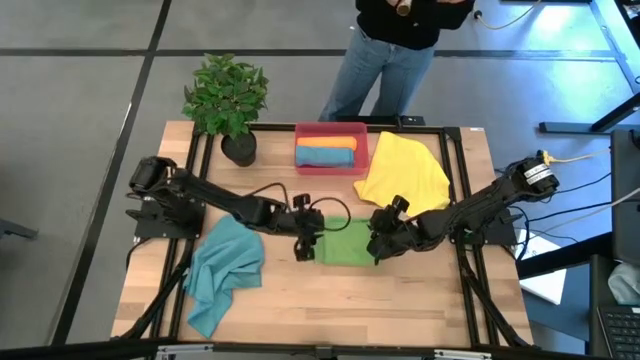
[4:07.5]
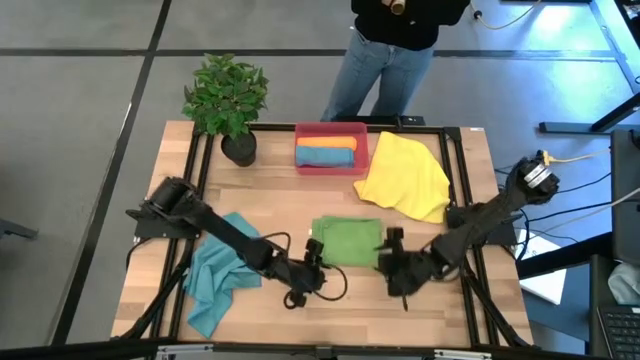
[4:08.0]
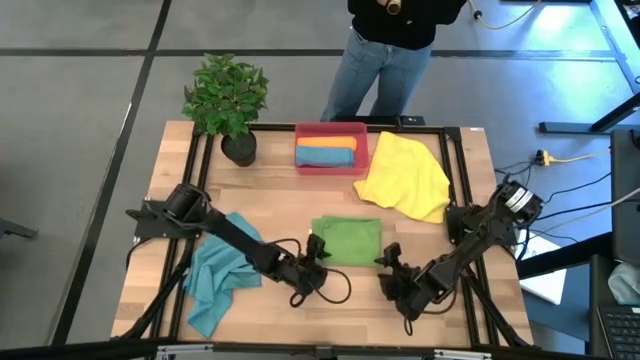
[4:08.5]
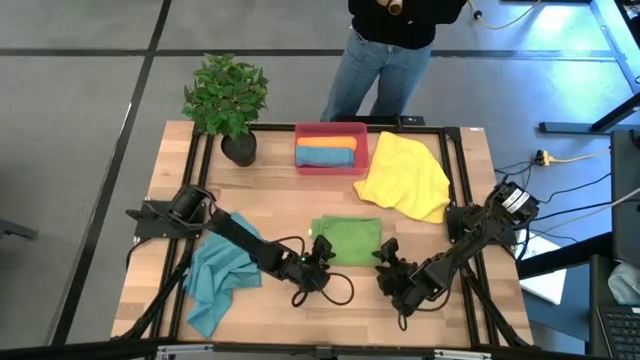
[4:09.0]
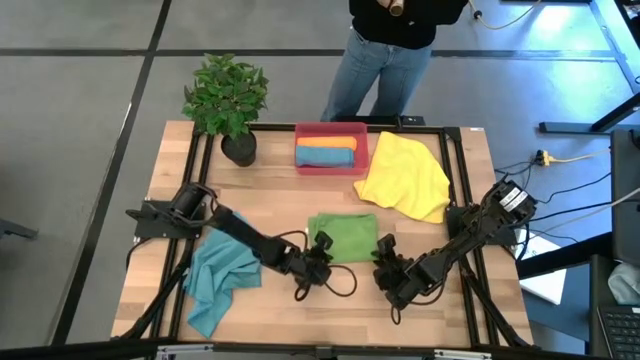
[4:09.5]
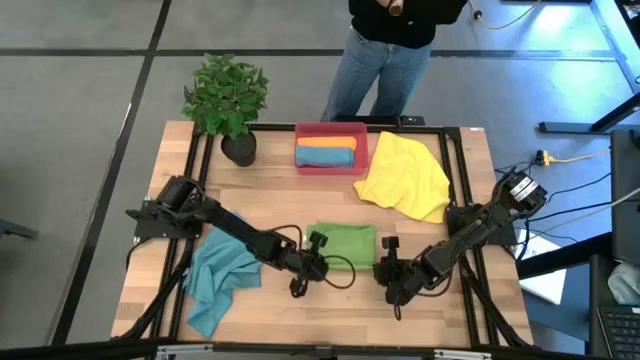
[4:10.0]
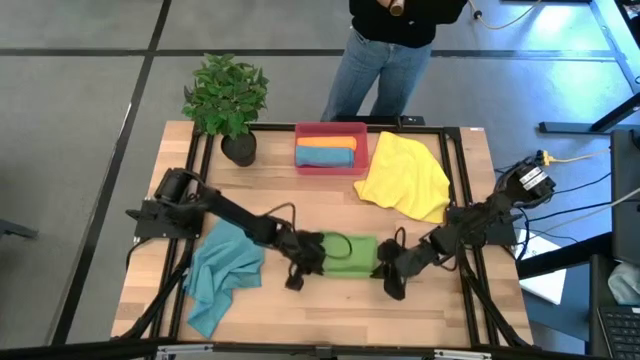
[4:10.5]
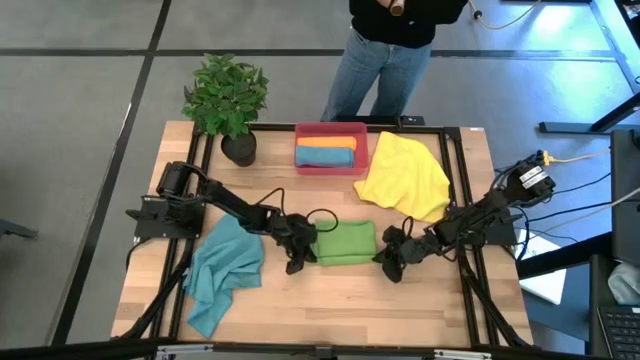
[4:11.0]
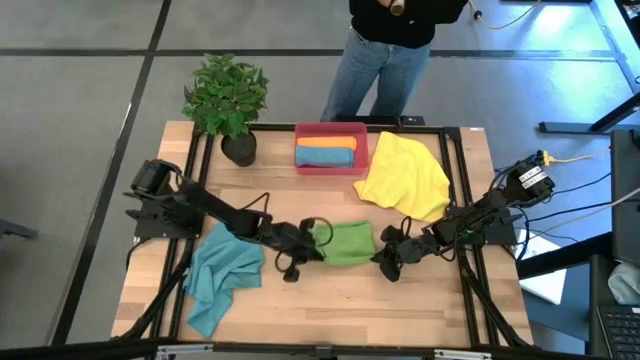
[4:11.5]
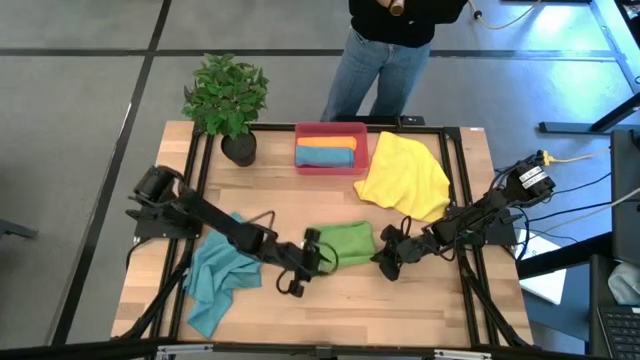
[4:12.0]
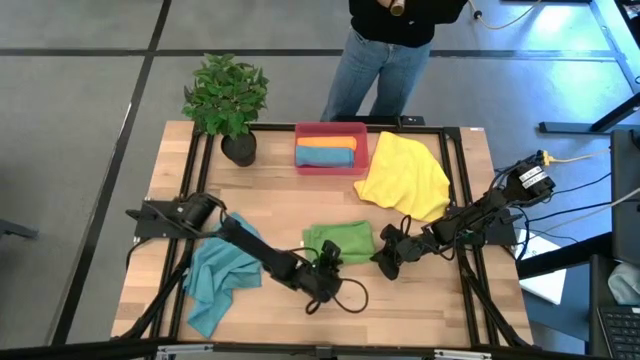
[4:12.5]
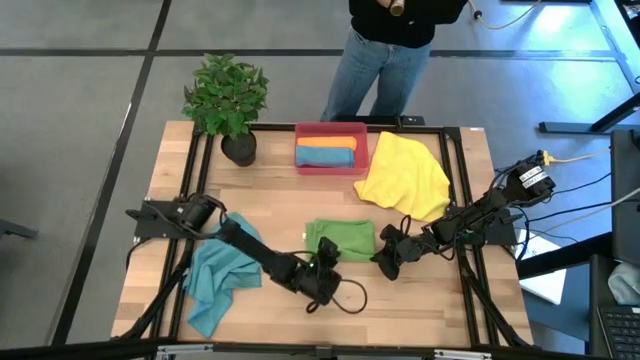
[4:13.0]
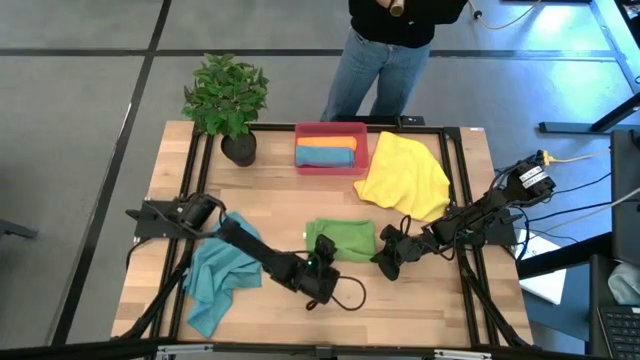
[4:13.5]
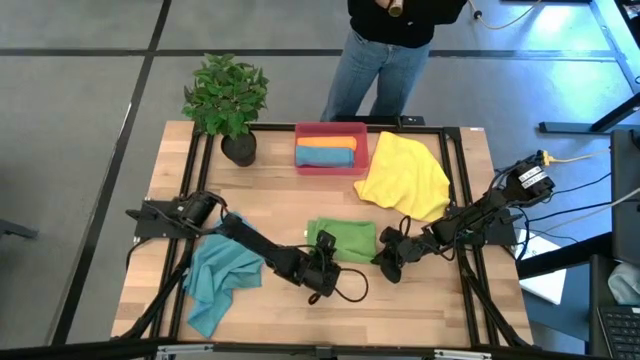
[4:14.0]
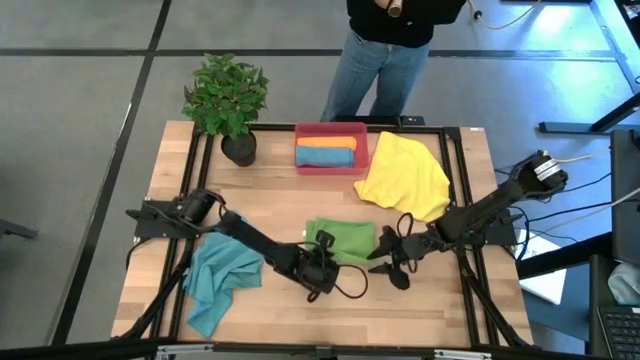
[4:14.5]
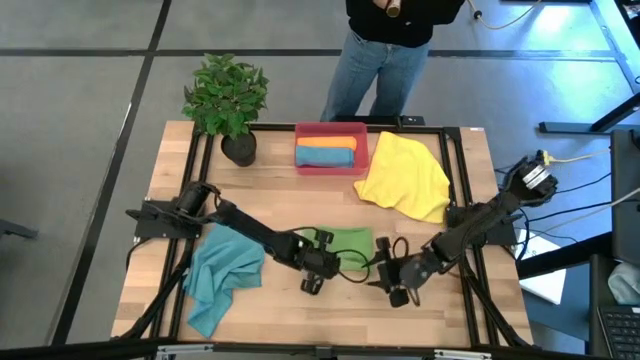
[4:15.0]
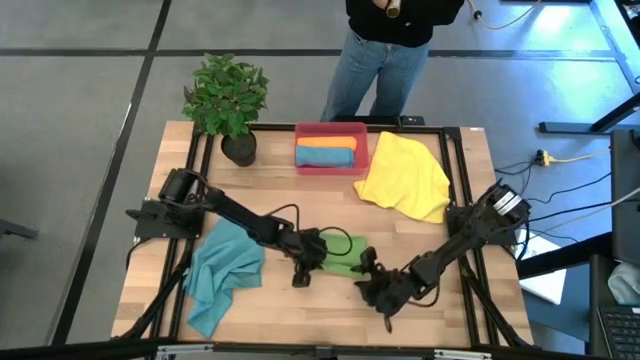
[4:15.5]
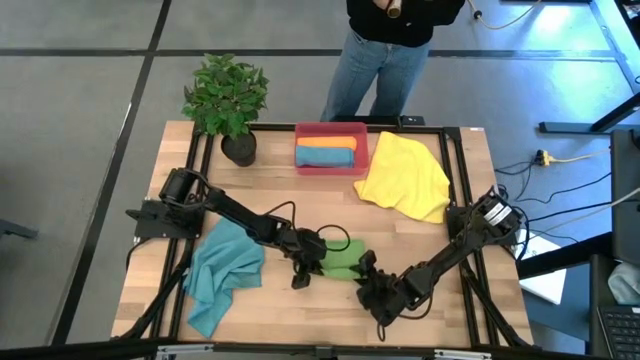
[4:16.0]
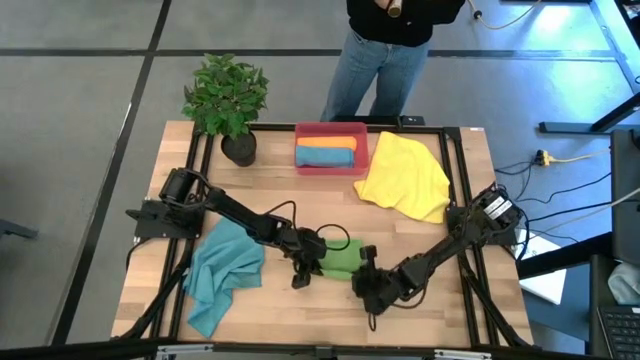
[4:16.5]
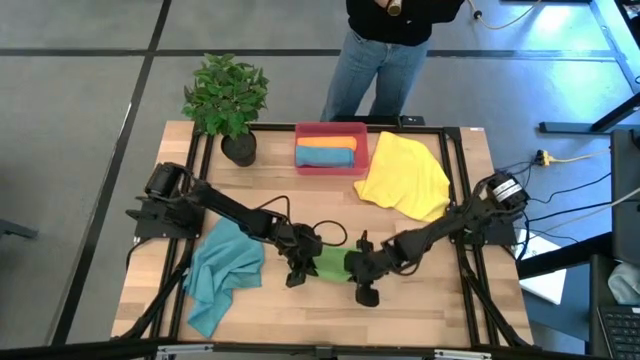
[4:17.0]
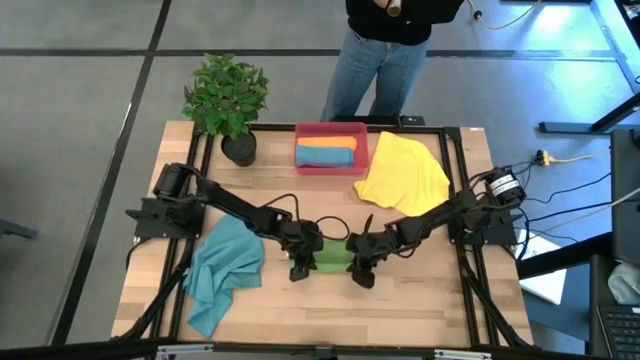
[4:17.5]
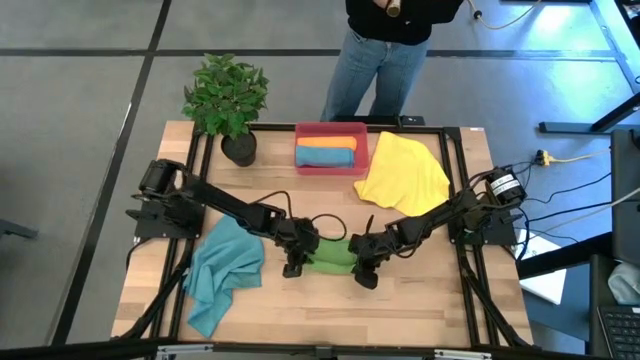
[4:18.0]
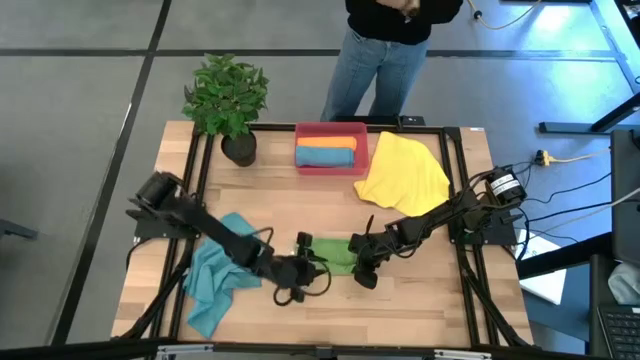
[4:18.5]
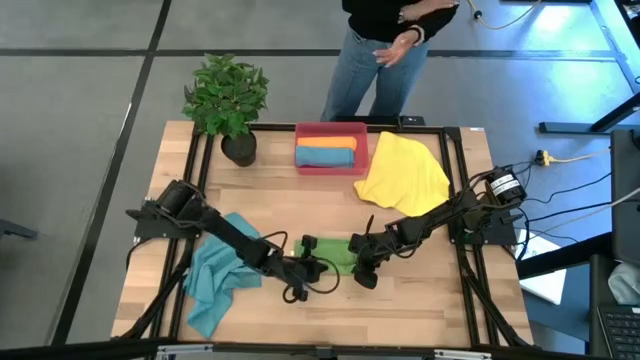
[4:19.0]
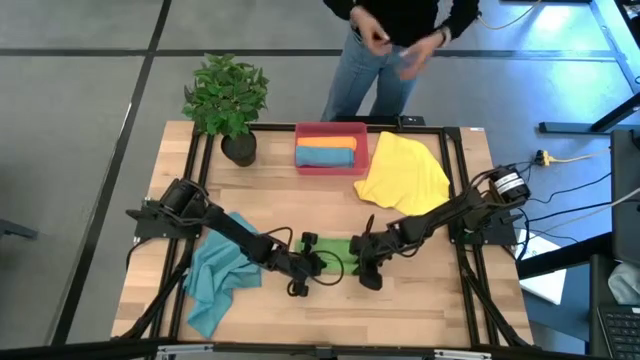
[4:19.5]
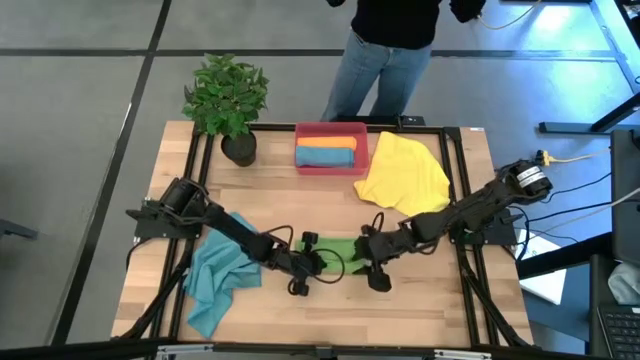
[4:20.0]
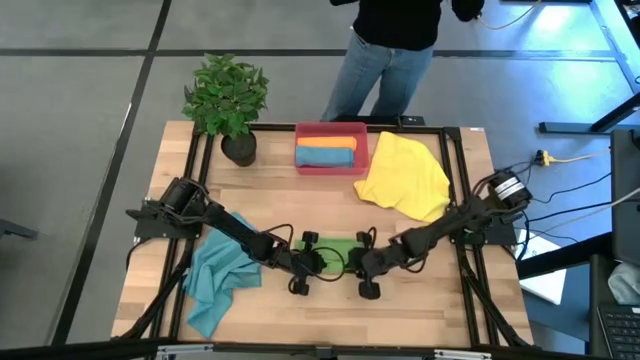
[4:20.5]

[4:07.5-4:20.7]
Task: Roll microfiber towels into tight, uniform cylinder then place into a basket
Roll the green towel

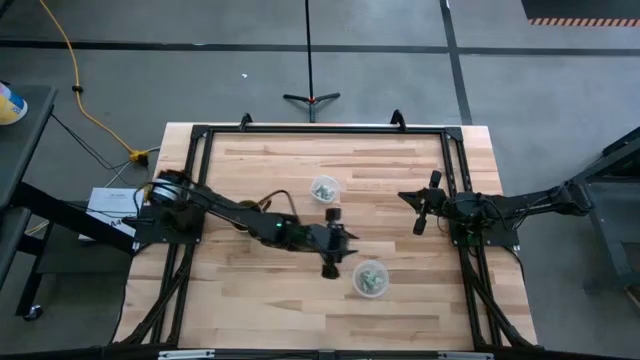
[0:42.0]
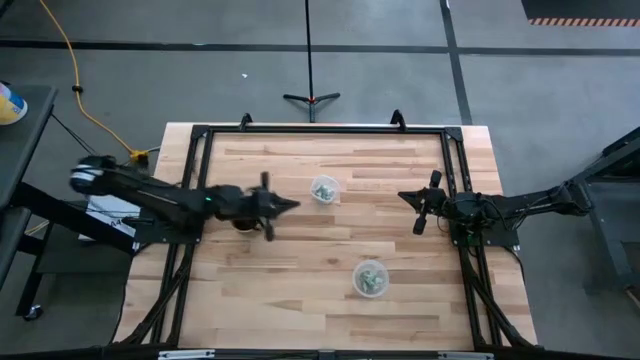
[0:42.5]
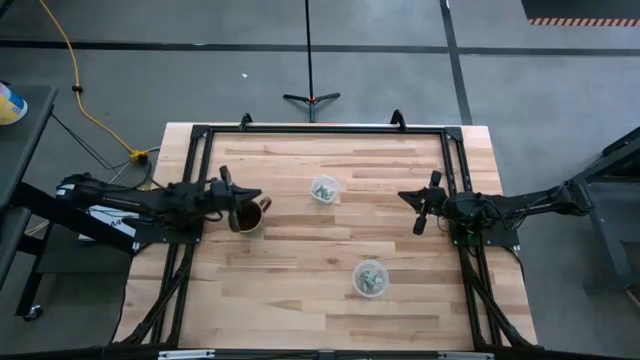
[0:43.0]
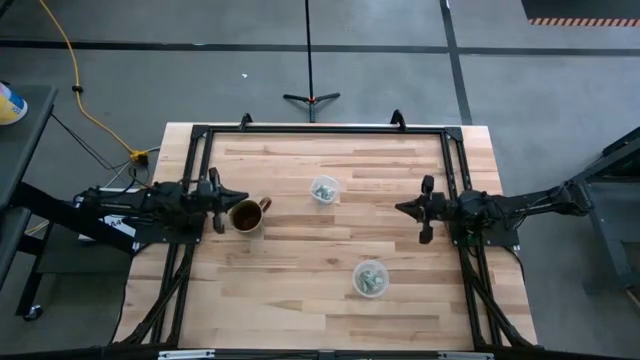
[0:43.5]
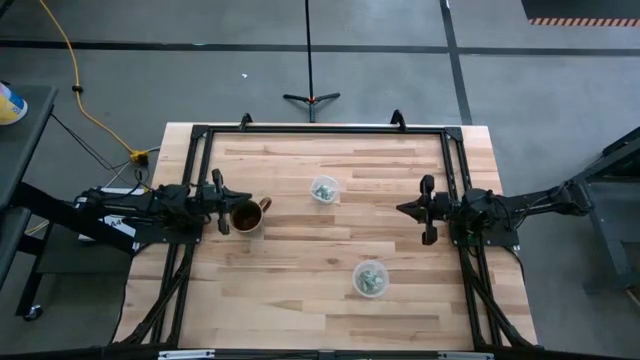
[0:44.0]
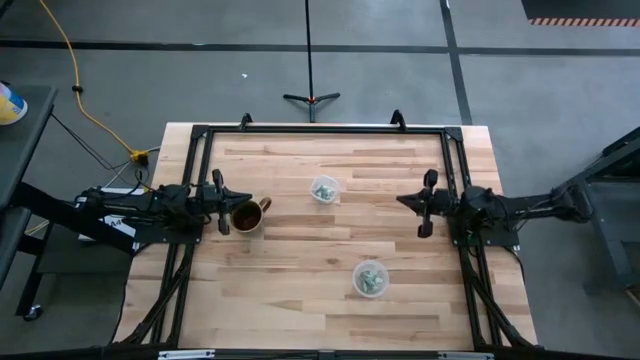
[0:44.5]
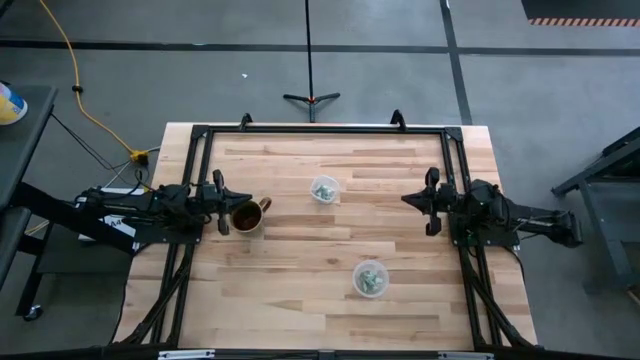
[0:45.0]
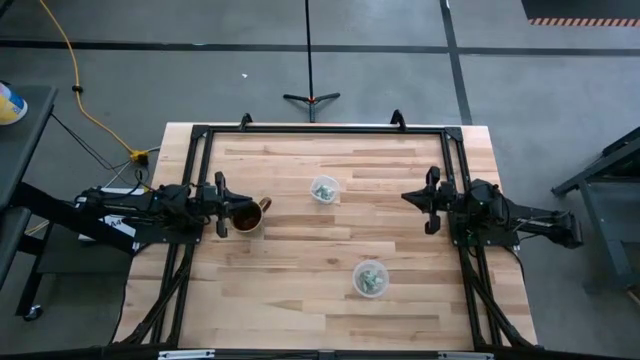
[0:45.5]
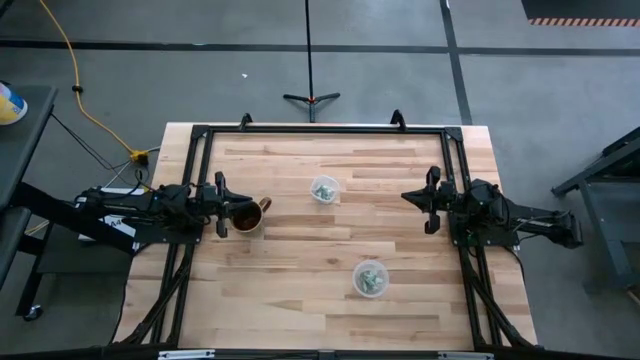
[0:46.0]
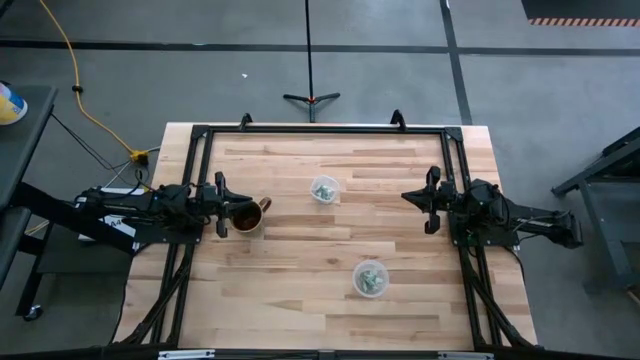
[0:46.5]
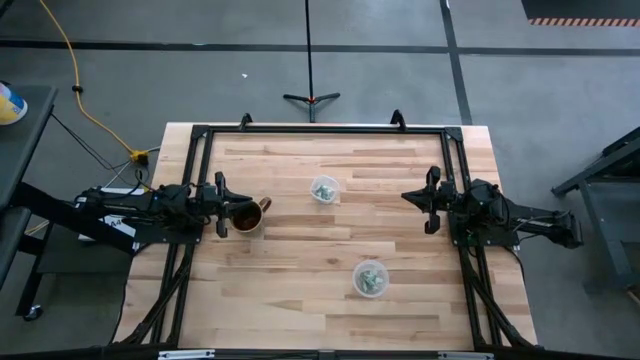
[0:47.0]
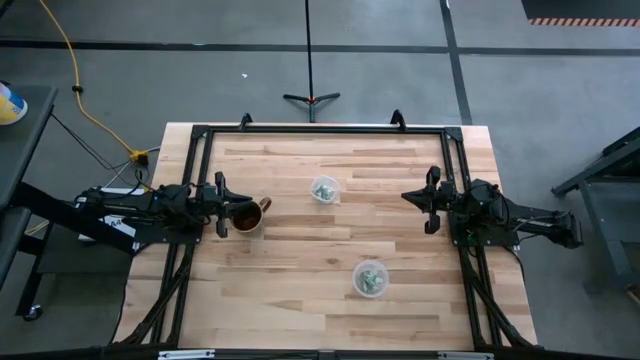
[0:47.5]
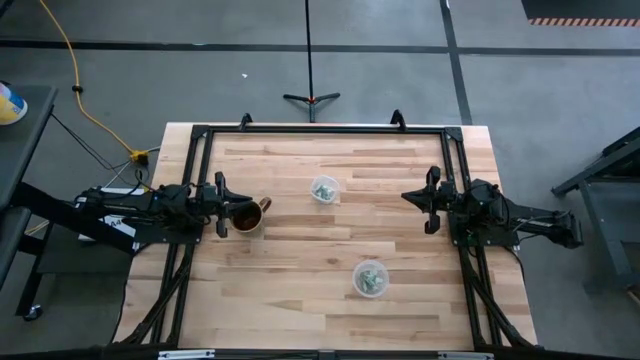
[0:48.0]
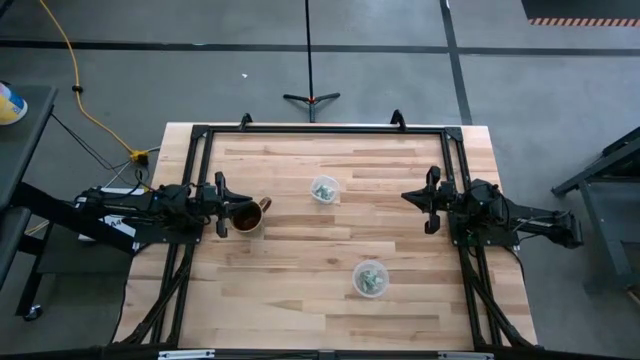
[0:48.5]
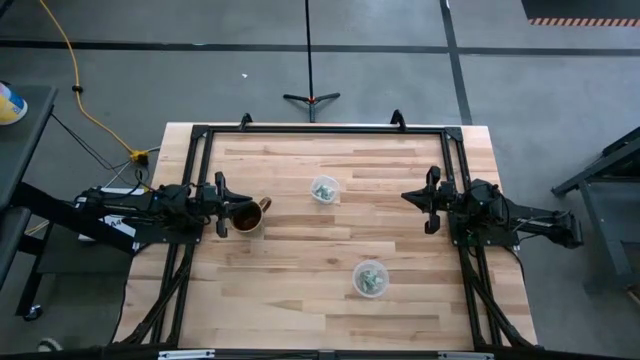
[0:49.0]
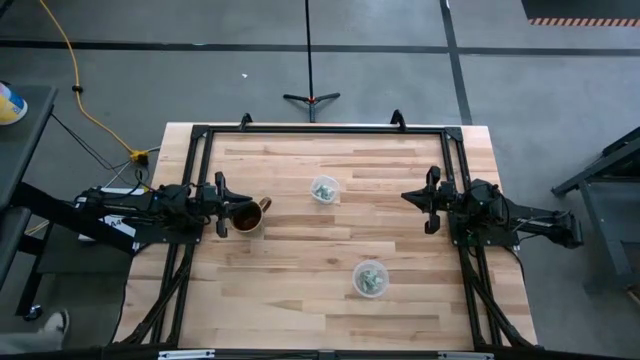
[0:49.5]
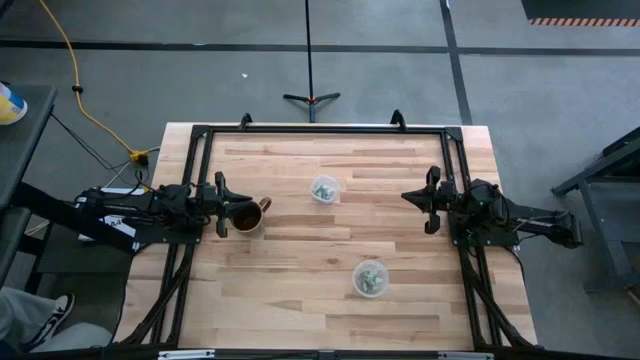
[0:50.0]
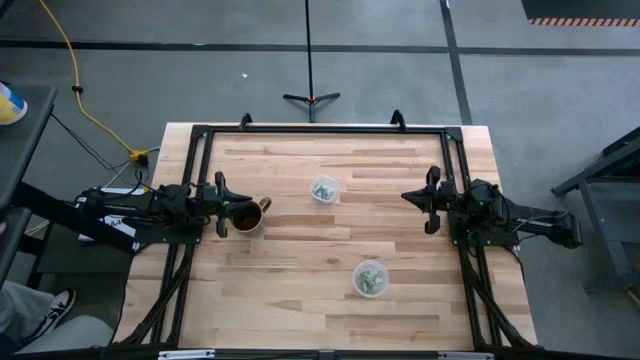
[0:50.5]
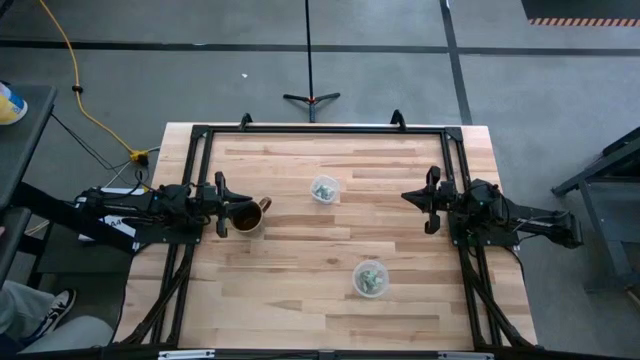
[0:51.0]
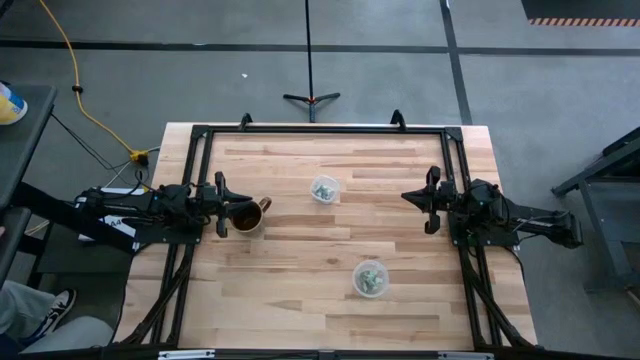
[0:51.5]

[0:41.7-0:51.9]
Task: Pick and place Stevia / Truvia into bins
Return to Home Position
